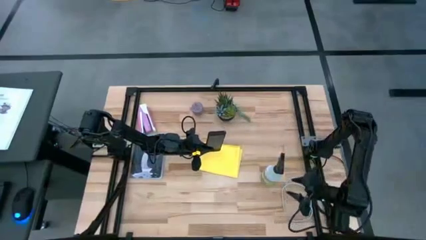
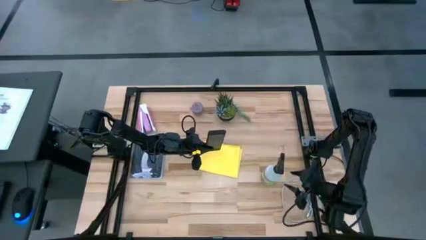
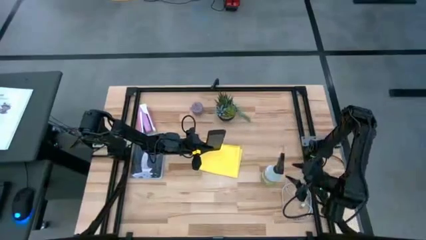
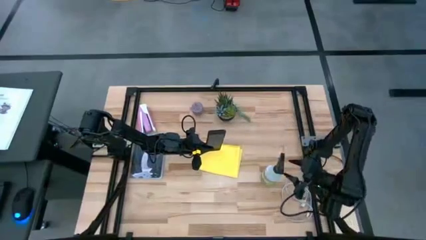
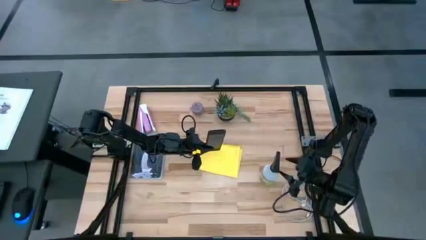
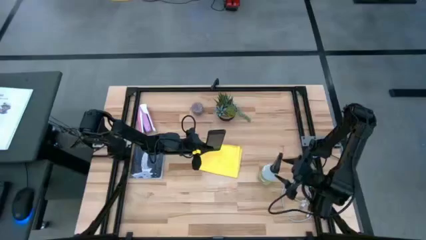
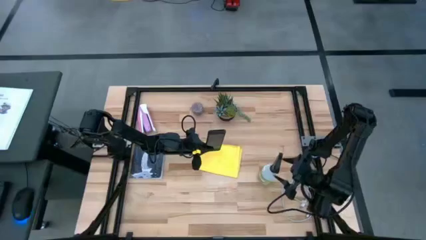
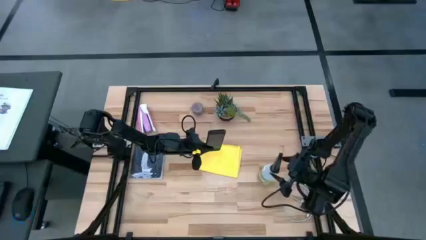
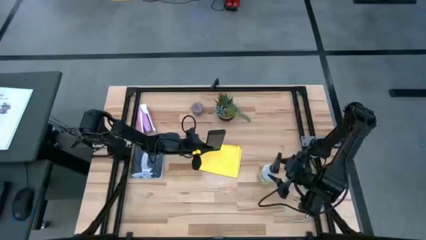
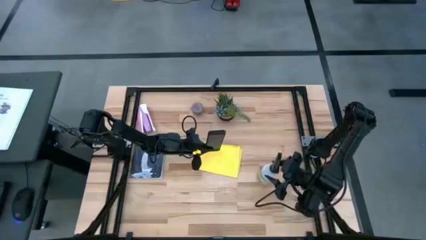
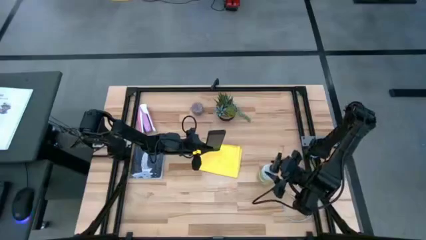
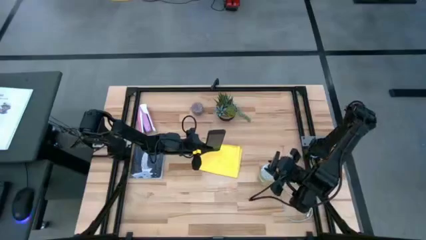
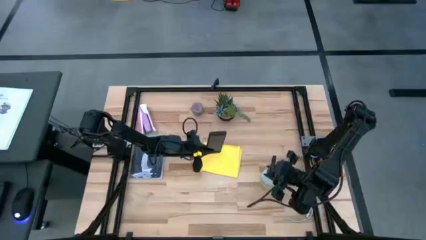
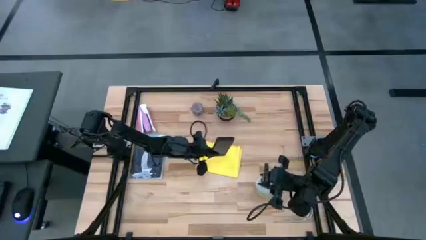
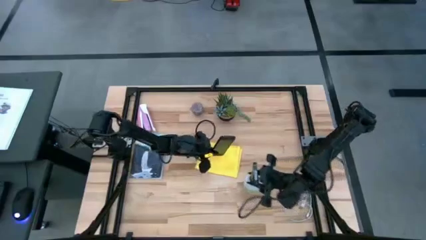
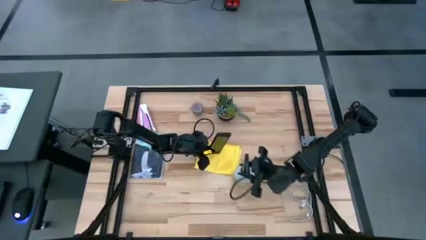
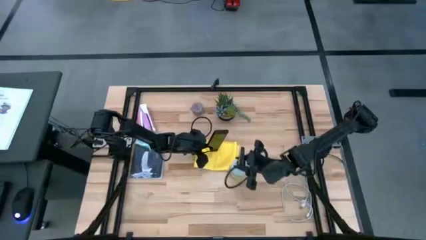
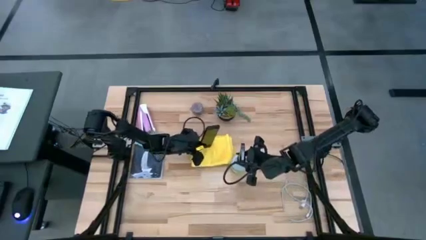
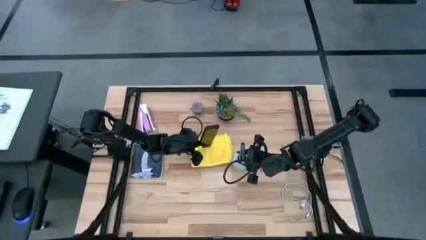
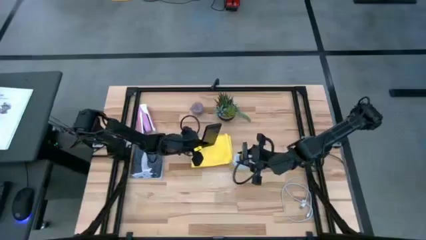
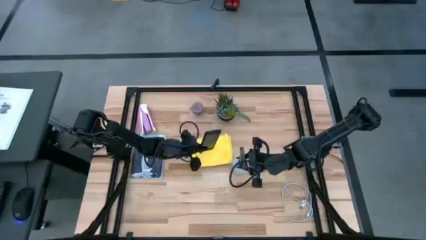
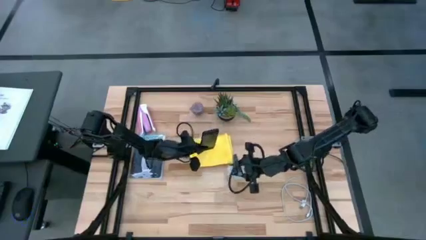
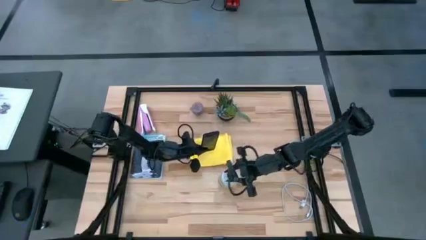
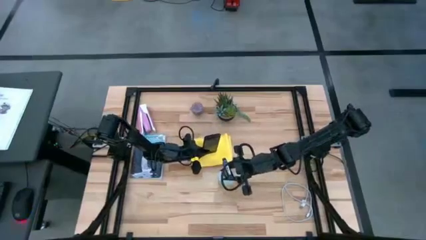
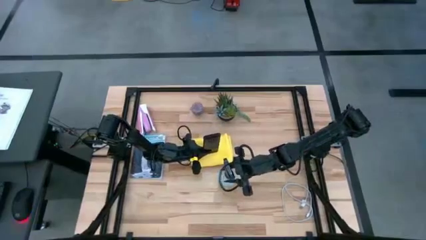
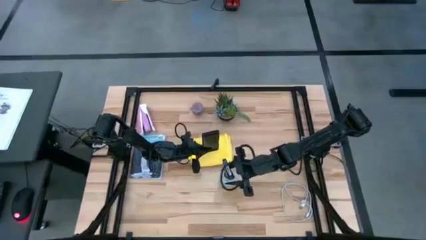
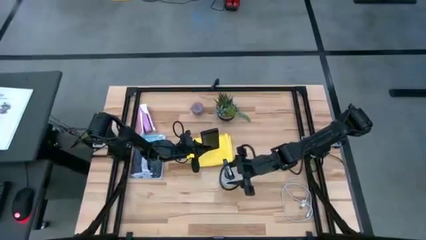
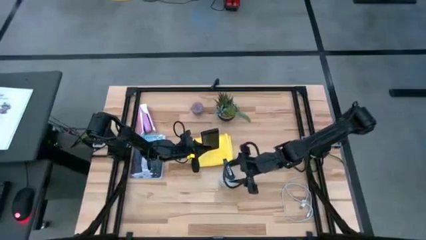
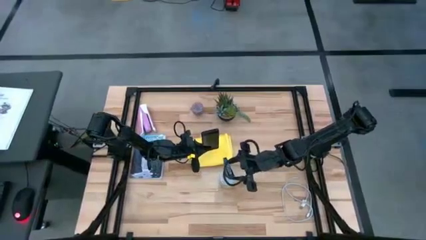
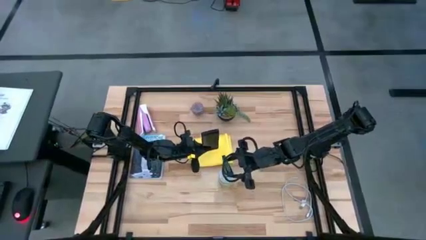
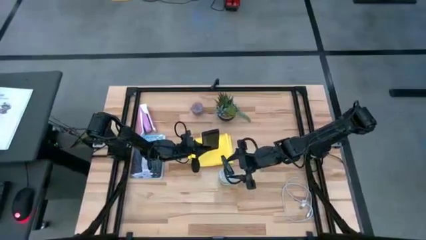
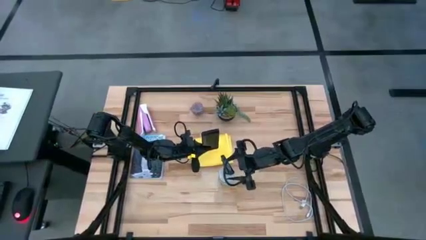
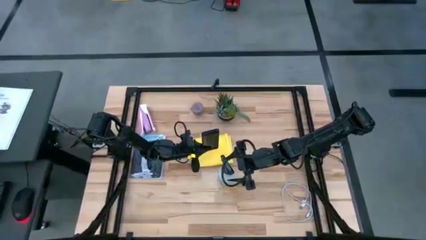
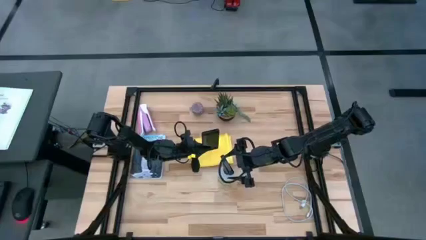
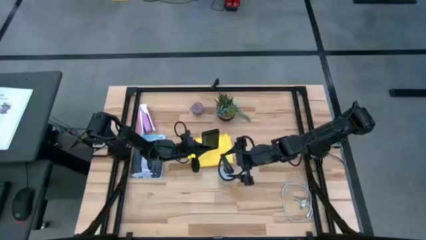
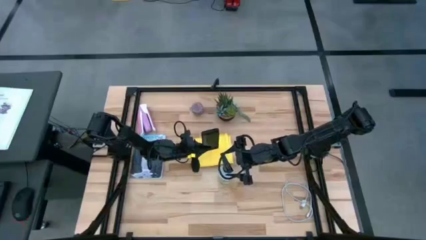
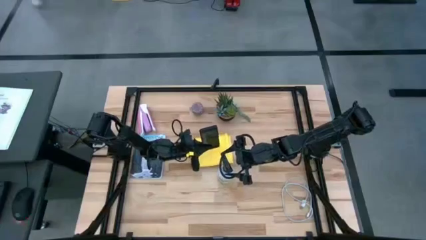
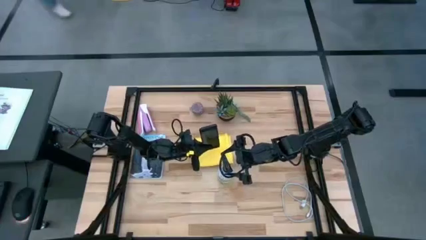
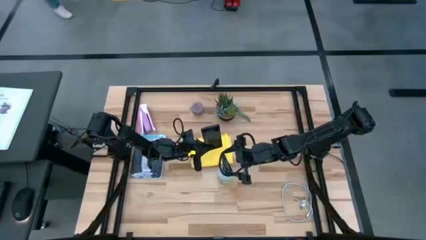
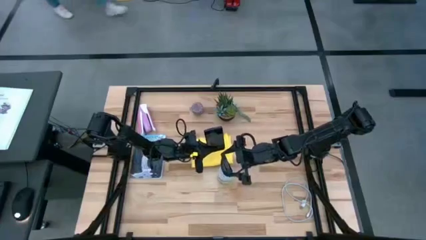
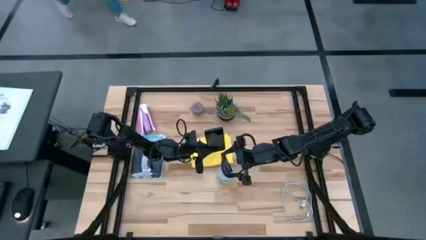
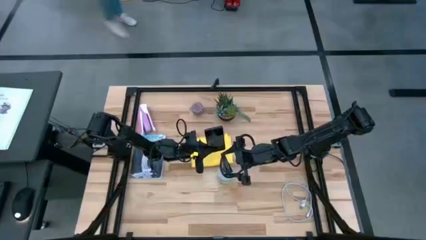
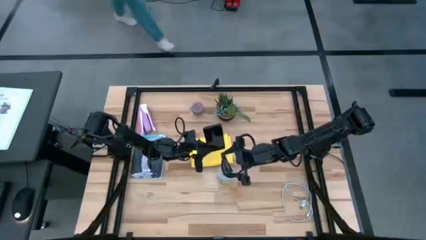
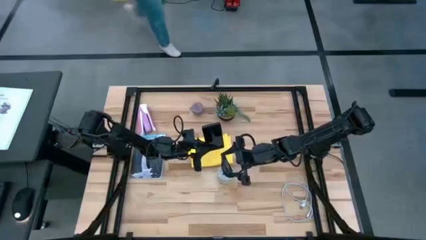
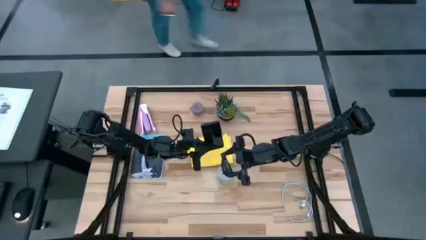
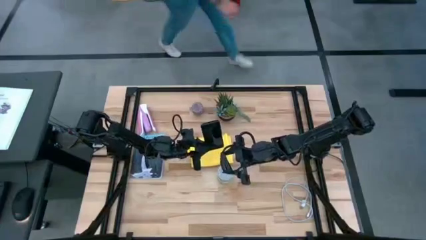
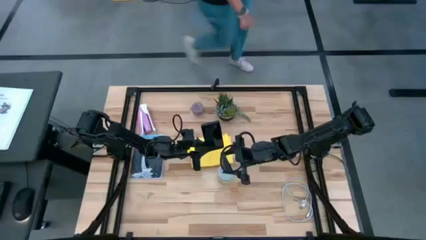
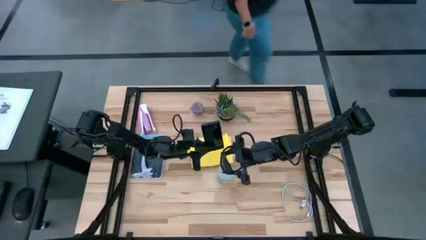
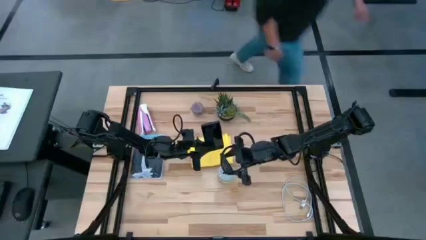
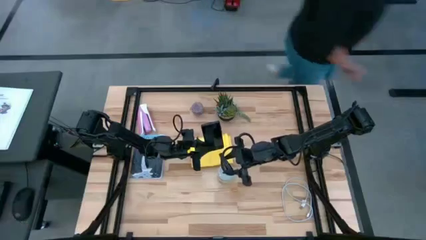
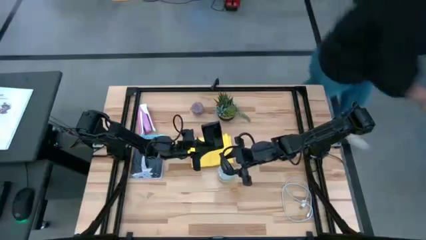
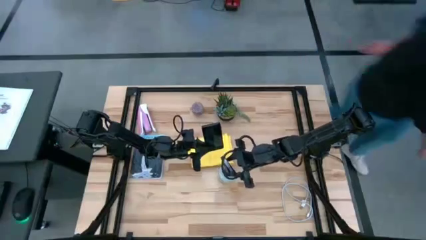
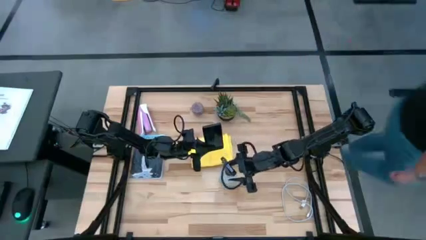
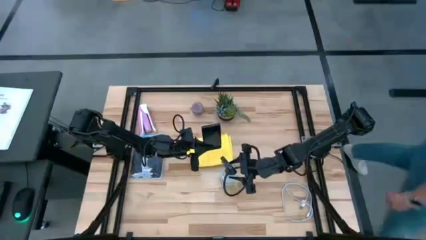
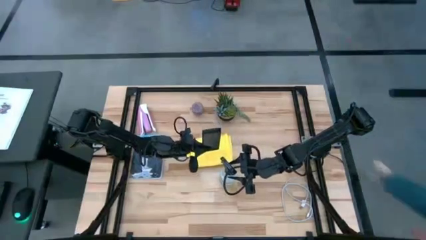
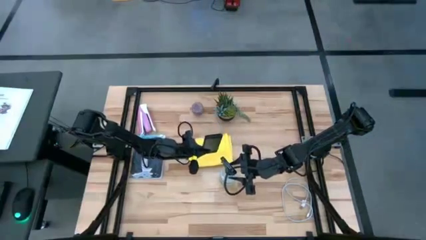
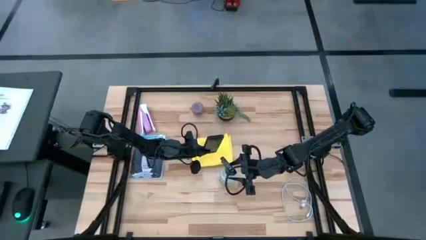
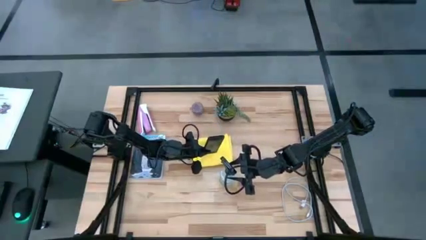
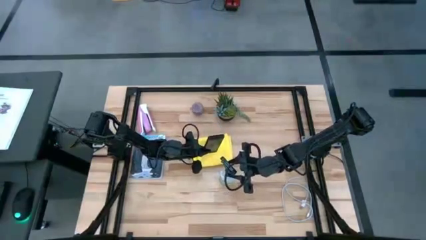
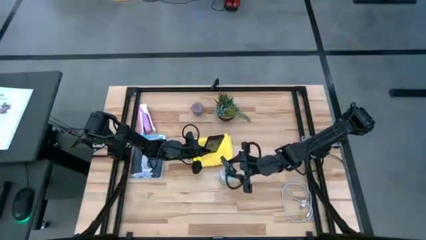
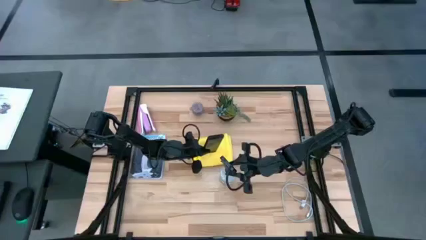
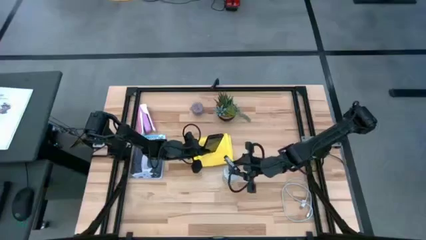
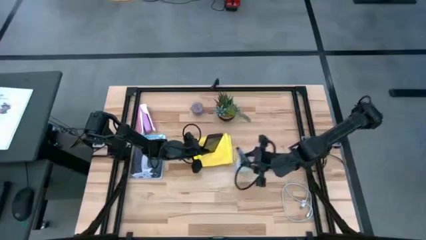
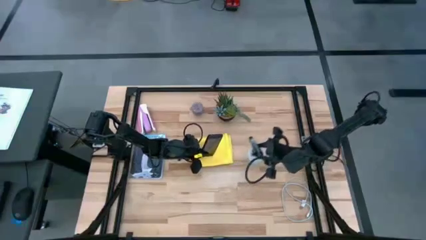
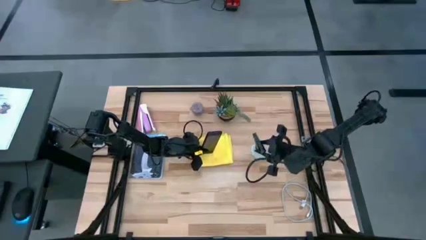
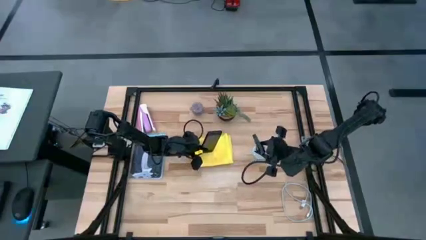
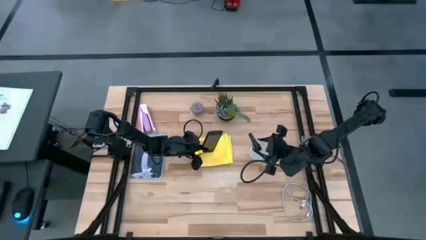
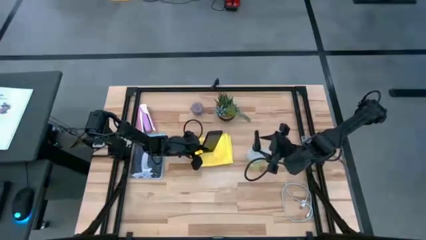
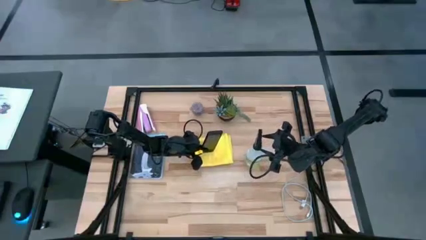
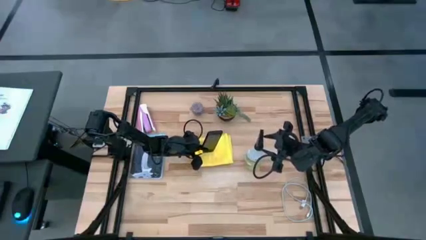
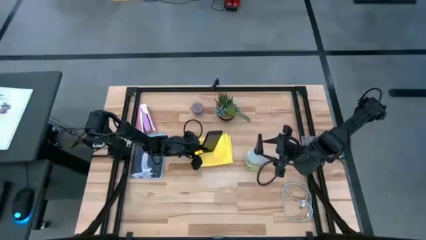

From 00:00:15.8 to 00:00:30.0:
Task: Apply microfiber cloth
Spray the cellphone with the bottle cleaner

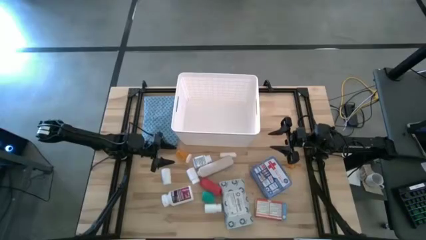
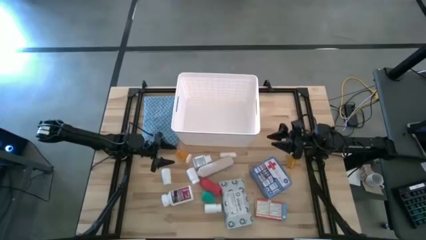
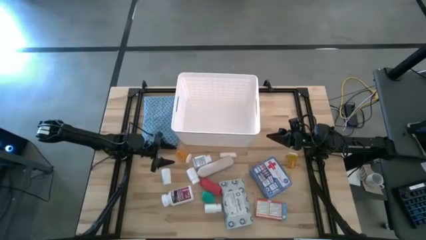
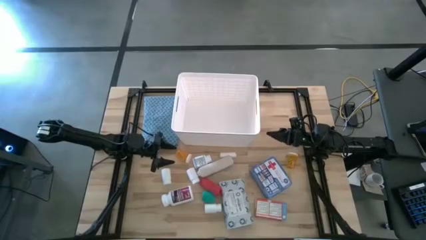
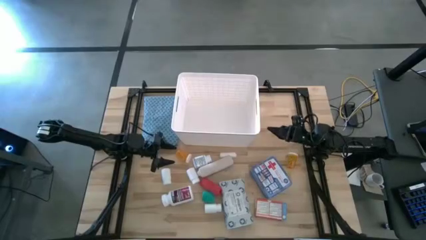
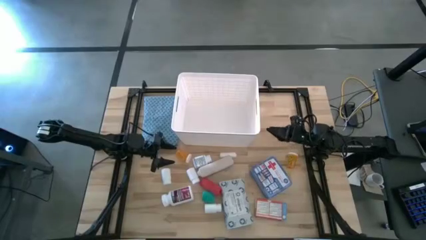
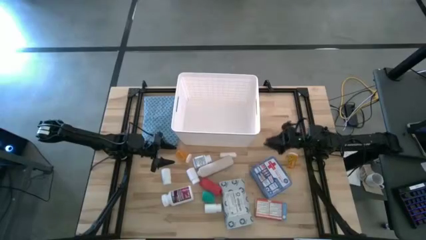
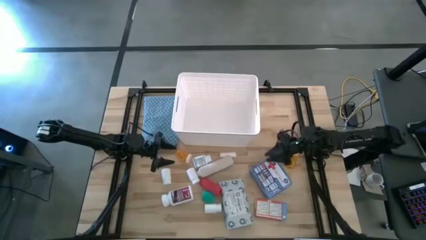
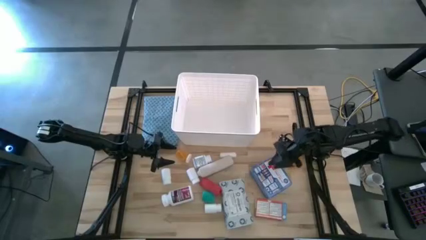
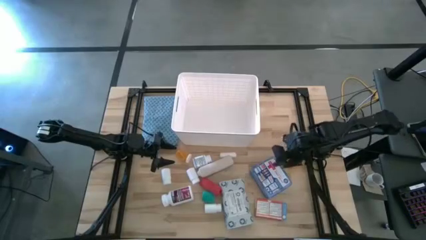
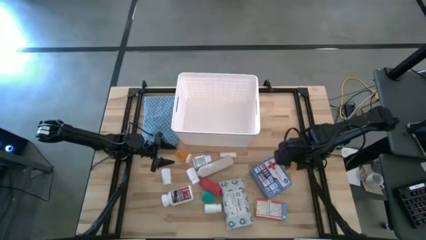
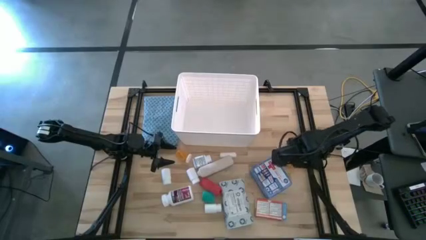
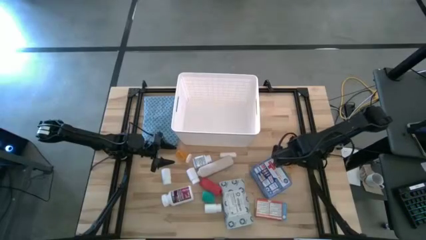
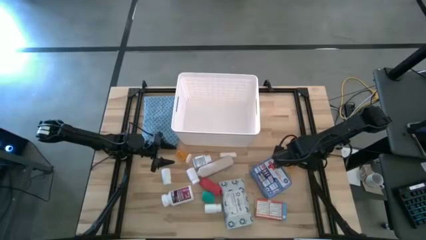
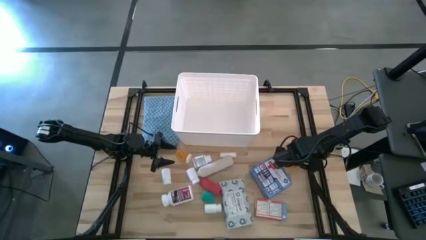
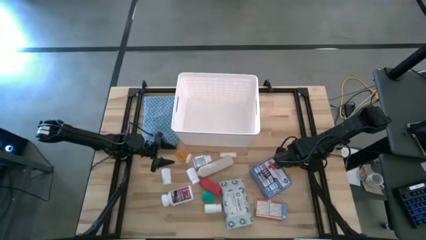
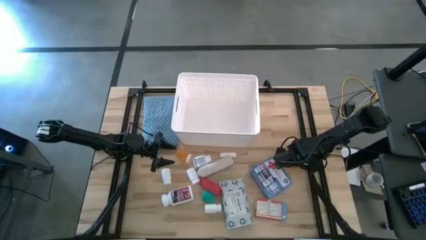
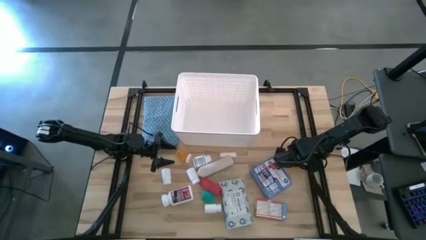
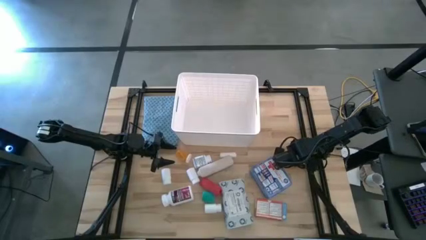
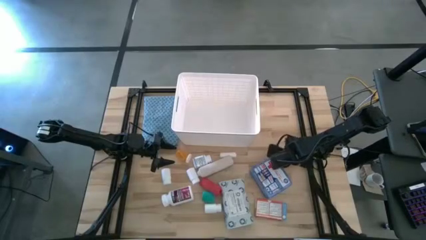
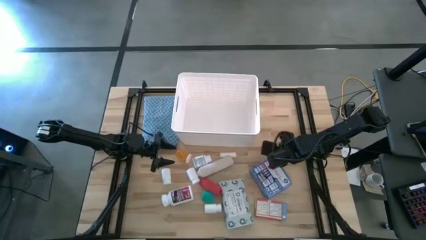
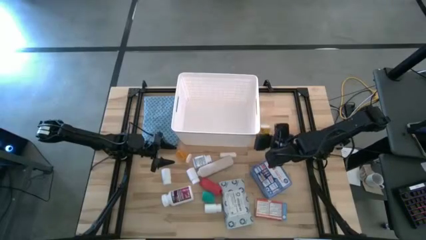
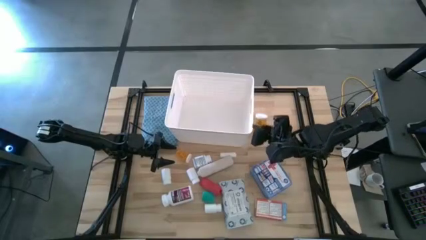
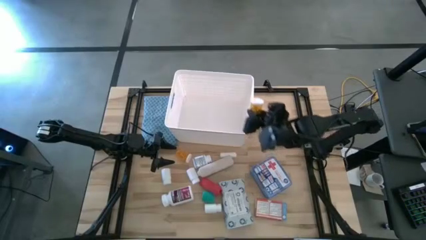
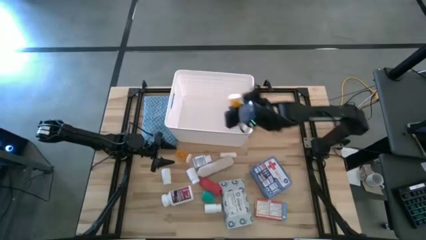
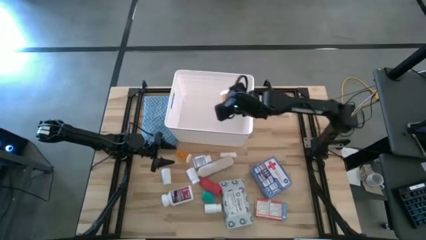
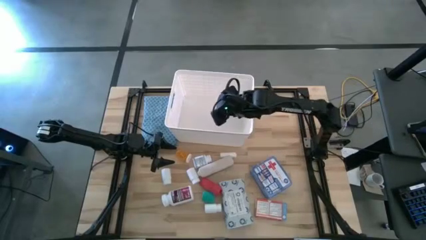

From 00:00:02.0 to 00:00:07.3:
Task: Pick & place medical supplies in basket/bin
Put the right orange pill bottle into the white container
